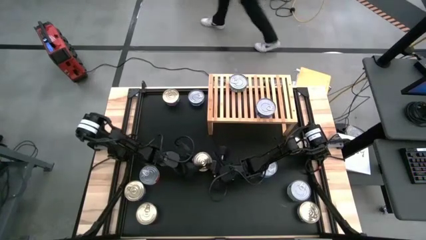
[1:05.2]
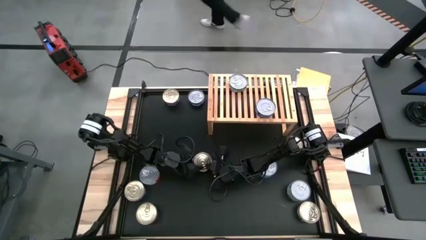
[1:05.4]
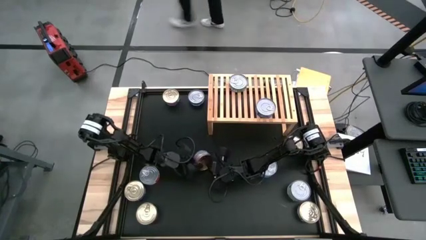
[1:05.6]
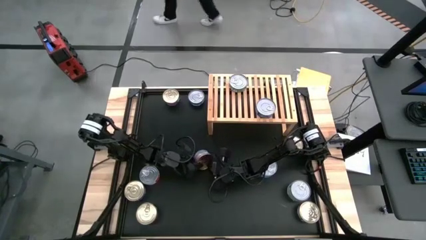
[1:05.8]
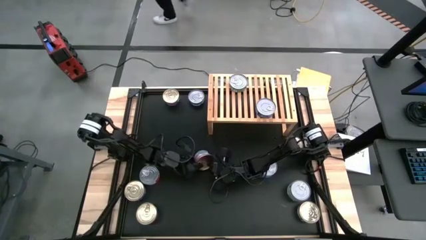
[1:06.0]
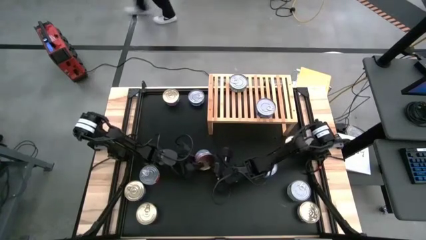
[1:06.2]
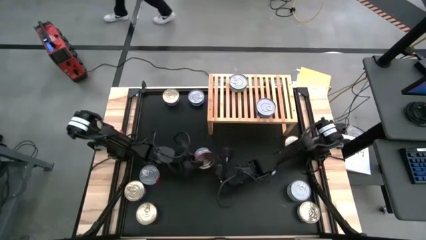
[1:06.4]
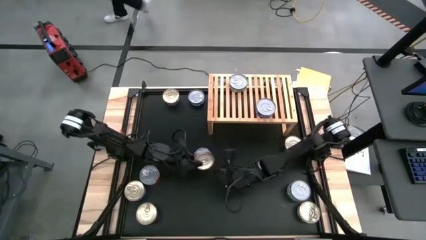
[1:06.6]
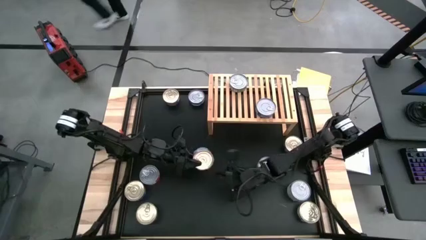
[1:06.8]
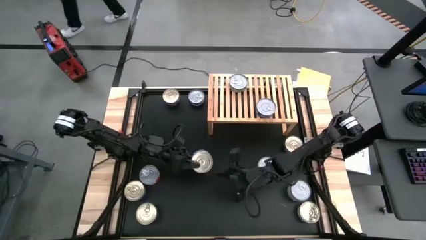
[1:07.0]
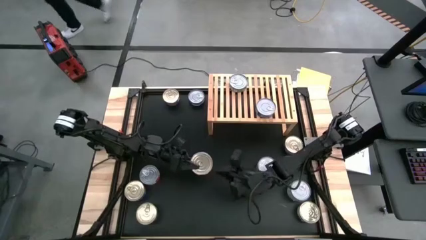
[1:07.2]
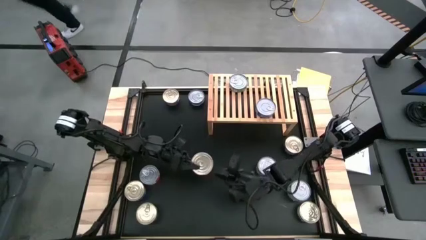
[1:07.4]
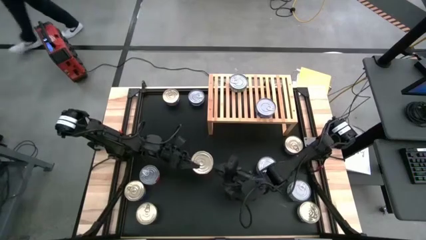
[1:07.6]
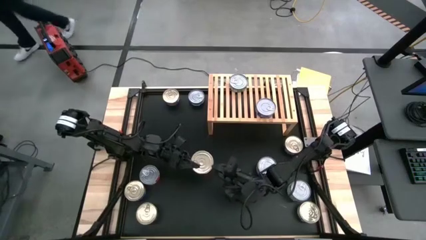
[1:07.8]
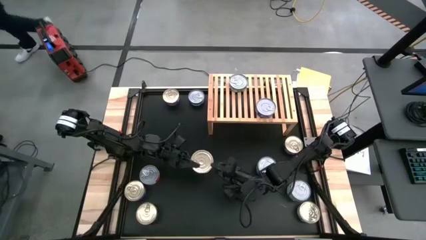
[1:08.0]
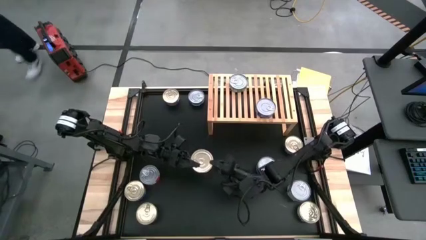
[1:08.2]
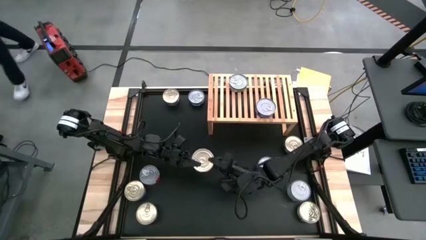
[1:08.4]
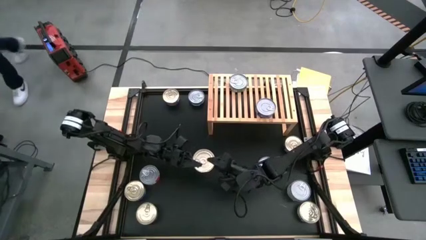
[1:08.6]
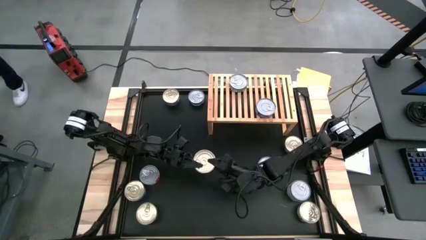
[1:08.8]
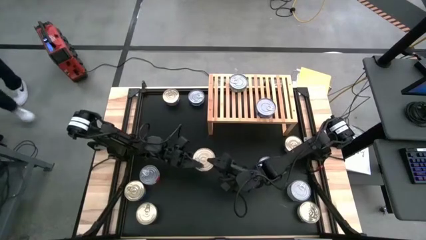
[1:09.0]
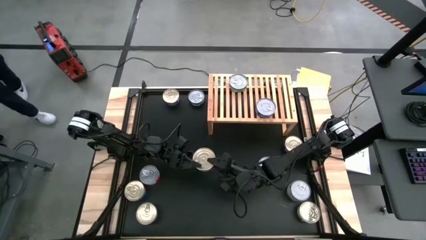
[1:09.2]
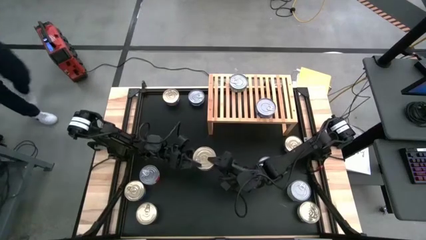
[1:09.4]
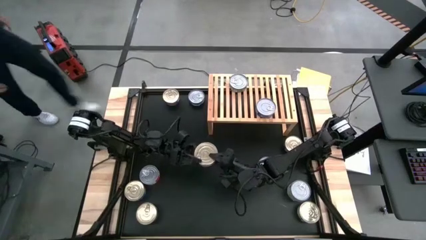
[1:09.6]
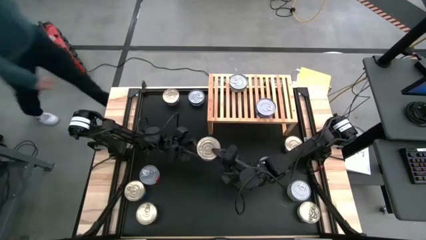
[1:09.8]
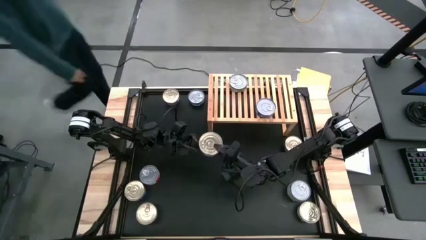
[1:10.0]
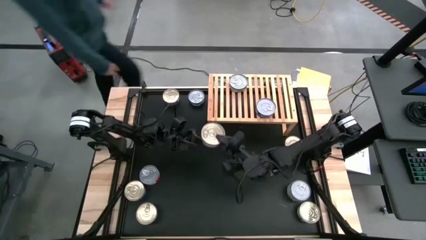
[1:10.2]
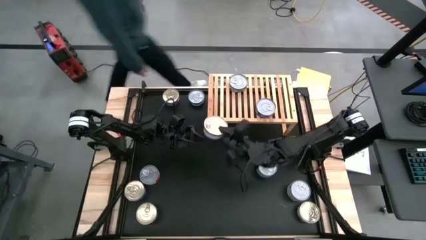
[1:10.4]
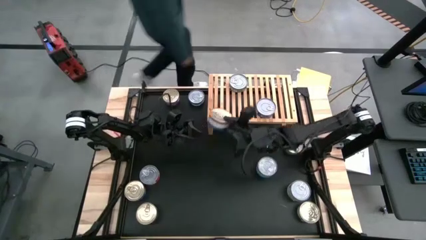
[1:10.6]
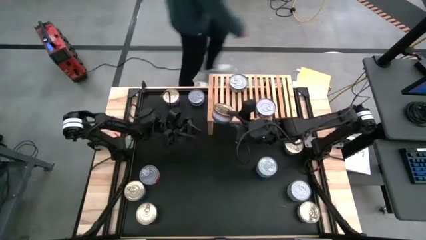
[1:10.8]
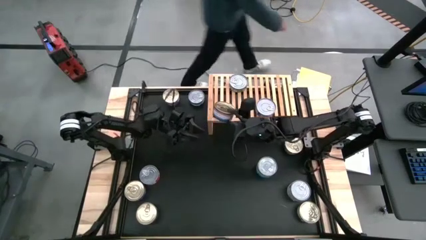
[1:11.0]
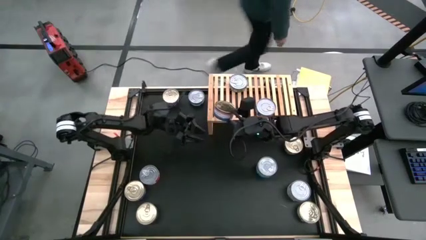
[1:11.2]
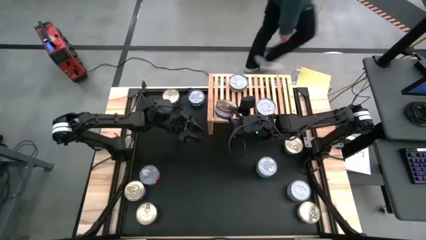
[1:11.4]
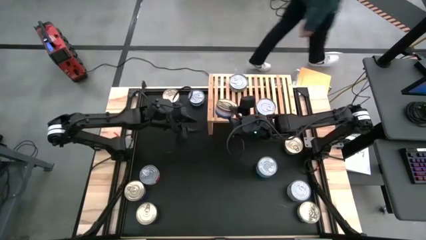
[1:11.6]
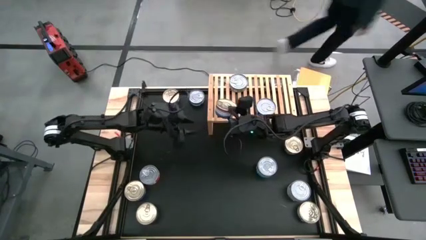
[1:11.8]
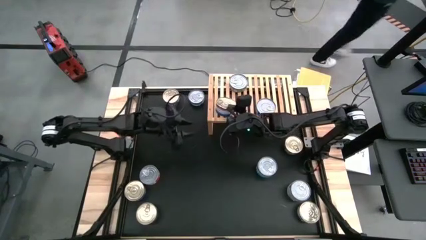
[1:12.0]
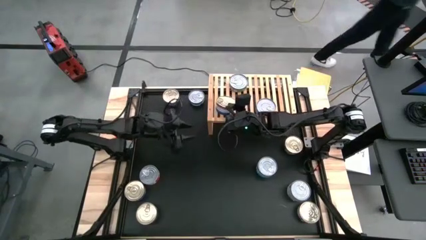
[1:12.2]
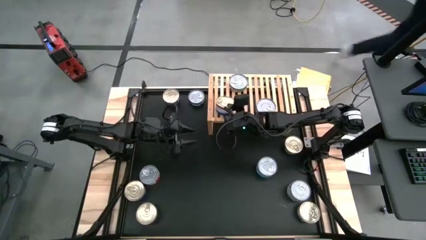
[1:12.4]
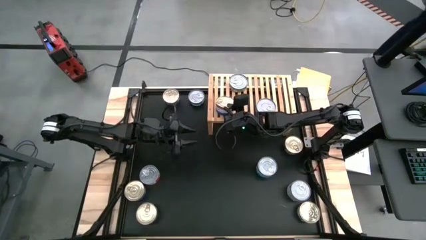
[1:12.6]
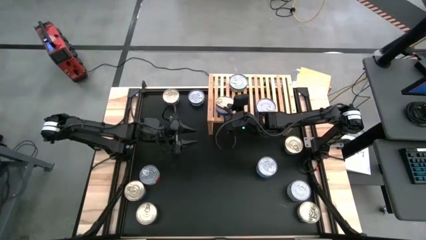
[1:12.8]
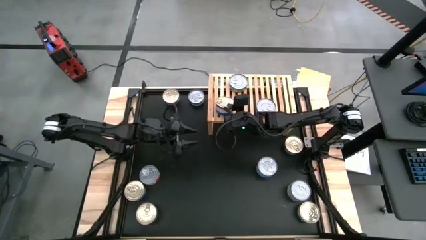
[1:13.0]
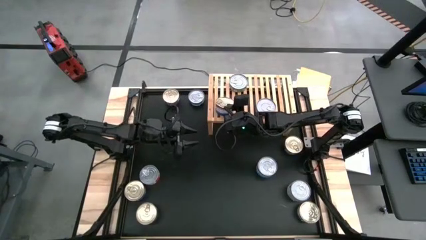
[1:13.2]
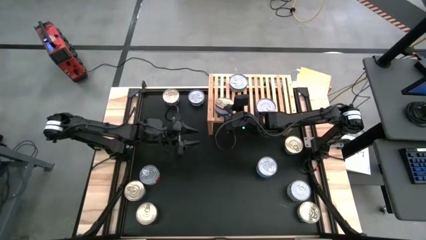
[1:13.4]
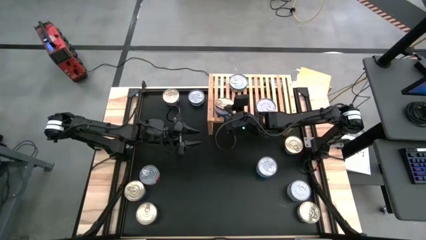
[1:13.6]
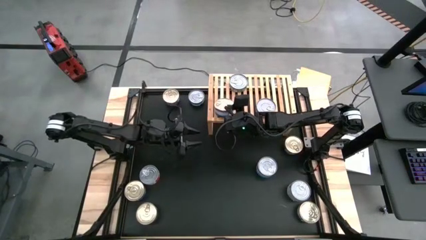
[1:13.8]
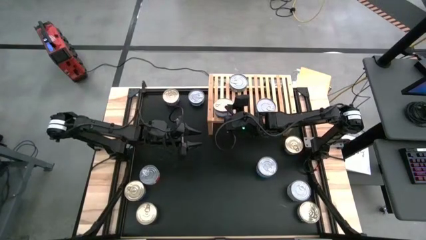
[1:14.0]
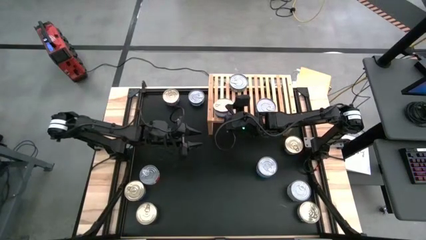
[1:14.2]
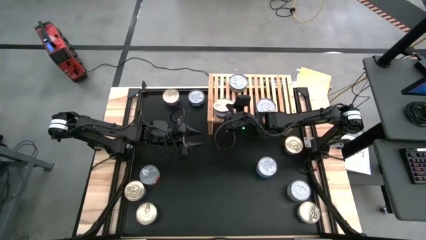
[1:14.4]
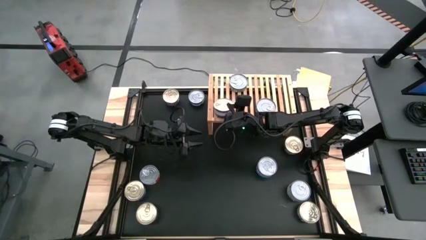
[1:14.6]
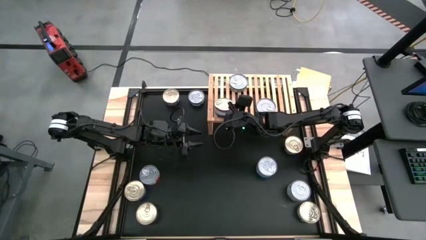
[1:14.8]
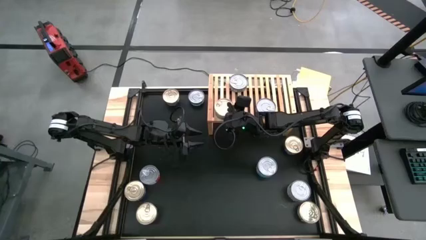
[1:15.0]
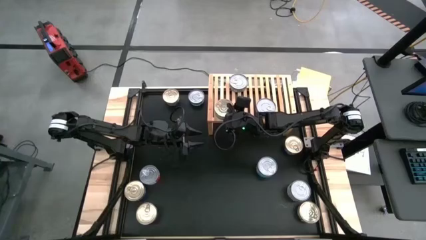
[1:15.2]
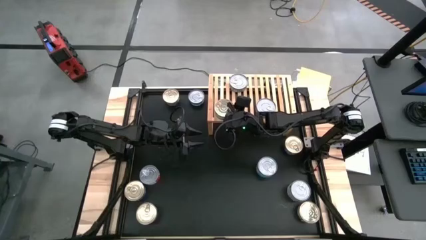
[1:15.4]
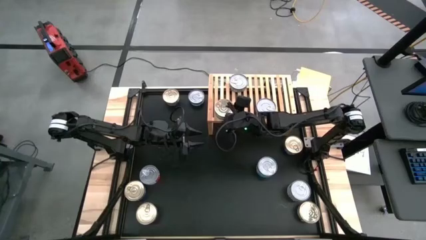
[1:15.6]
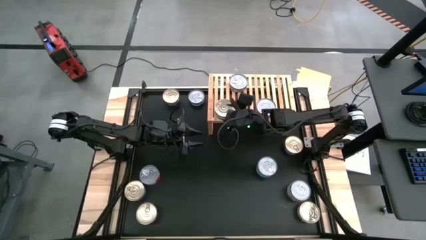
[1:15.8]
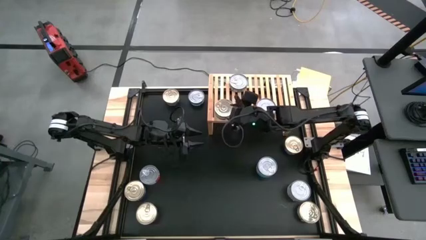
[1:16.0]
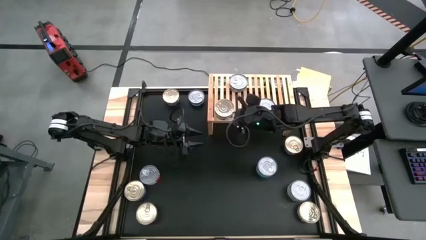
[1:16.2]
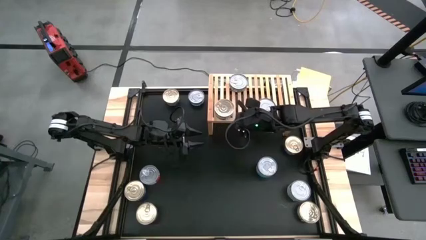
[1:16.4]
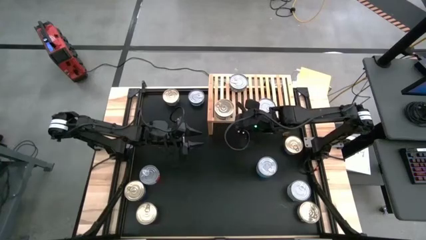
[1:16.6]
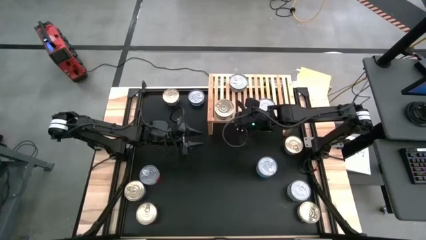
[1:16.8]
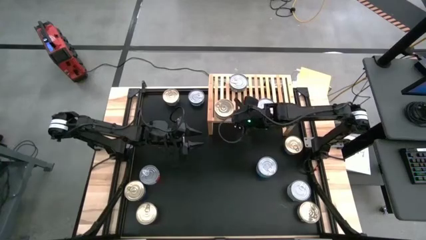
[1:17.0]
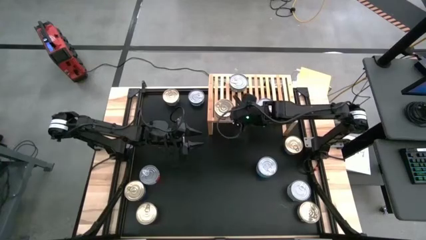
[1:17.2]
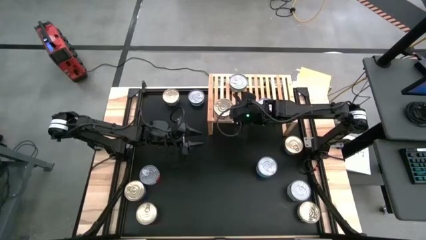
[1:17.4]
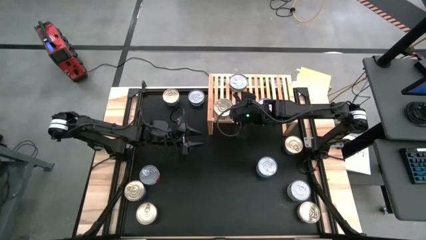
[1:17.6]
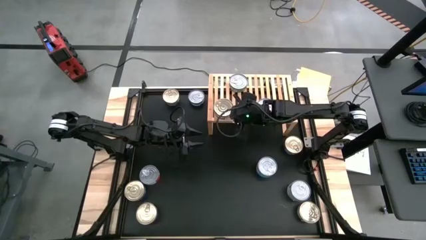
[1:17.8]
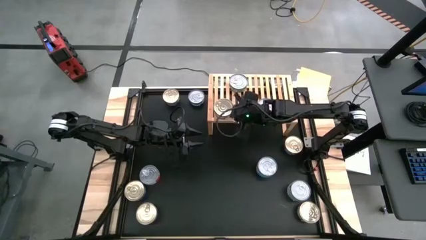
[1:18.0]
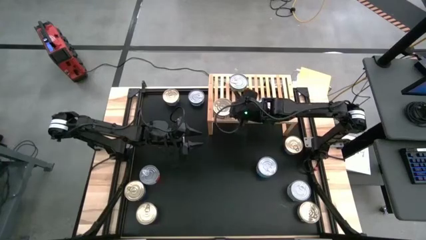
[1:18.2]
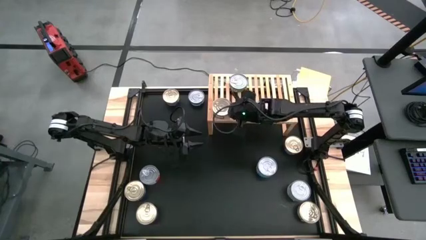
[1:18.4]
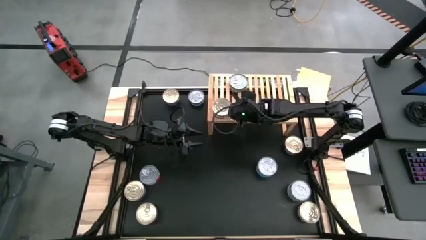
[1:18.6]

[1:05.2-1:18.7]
Task: Stack canned seafood by type on shelf
Put the blue-pink tuna can on the shelf
